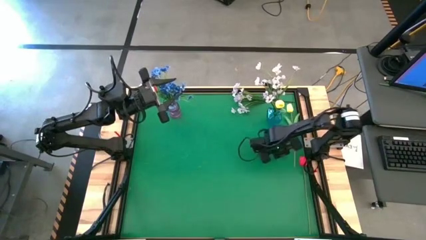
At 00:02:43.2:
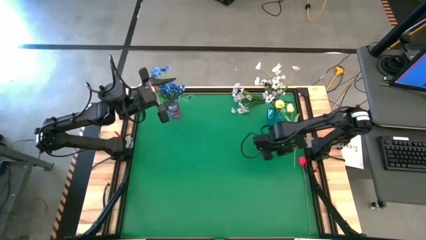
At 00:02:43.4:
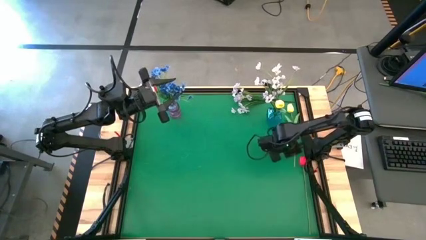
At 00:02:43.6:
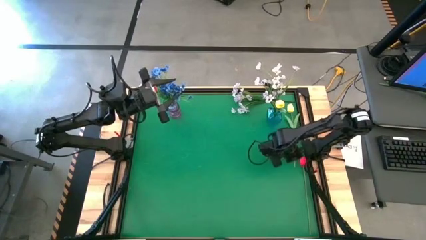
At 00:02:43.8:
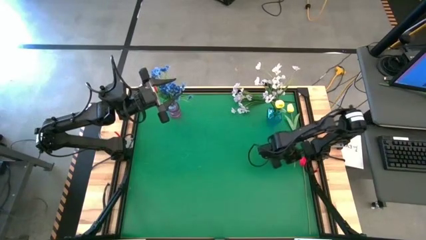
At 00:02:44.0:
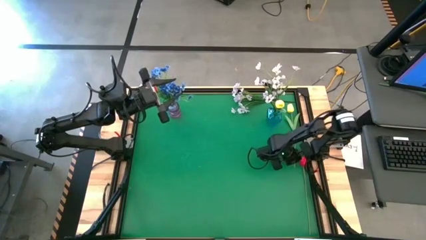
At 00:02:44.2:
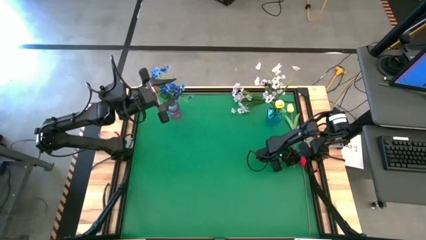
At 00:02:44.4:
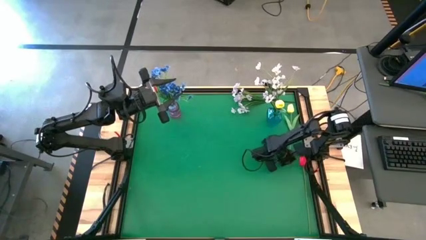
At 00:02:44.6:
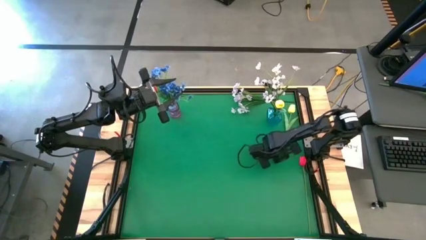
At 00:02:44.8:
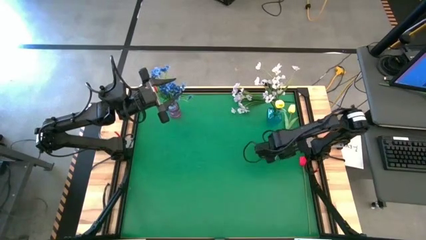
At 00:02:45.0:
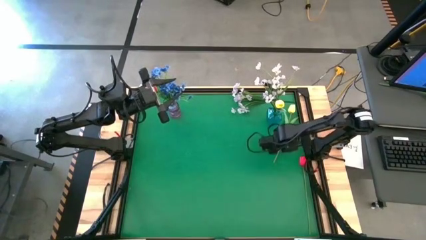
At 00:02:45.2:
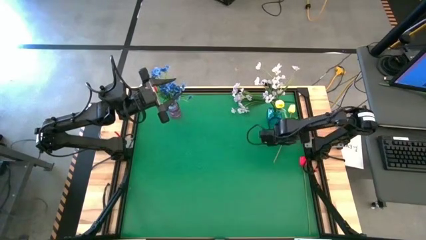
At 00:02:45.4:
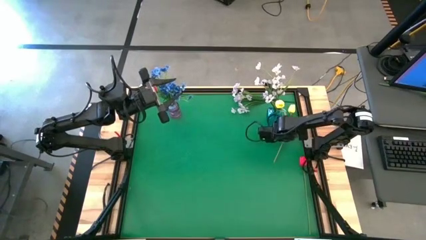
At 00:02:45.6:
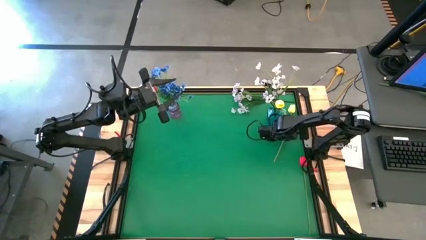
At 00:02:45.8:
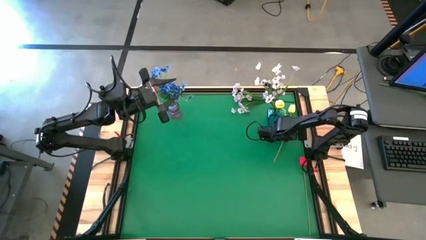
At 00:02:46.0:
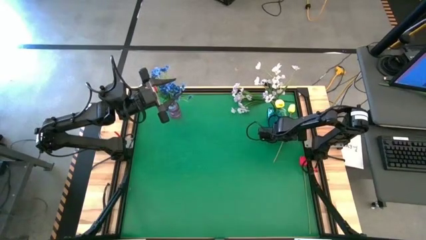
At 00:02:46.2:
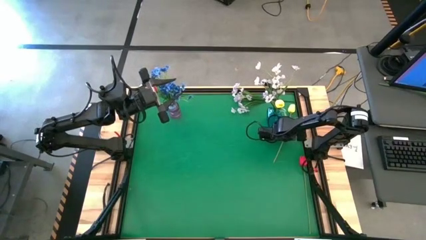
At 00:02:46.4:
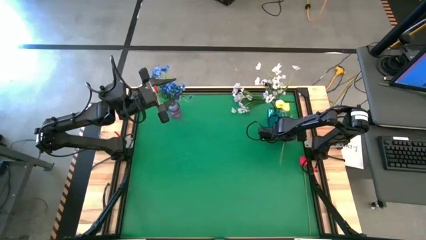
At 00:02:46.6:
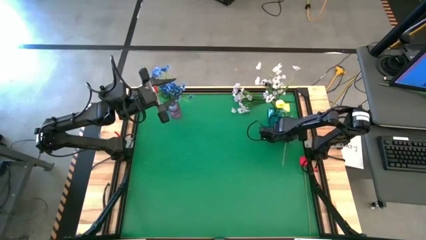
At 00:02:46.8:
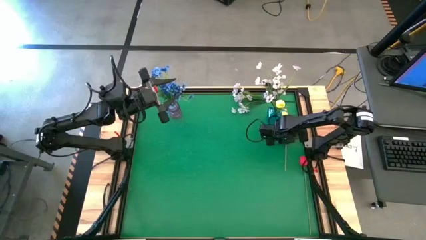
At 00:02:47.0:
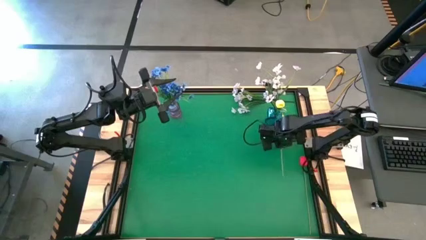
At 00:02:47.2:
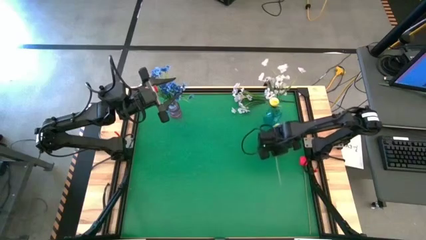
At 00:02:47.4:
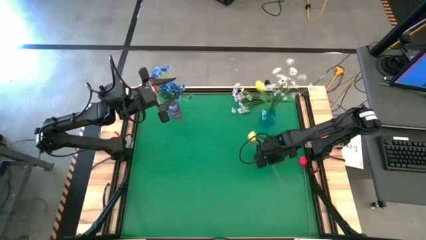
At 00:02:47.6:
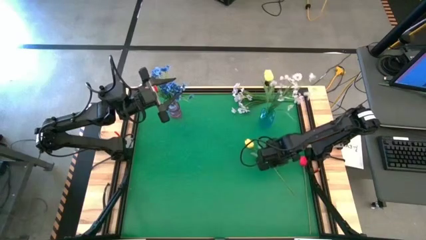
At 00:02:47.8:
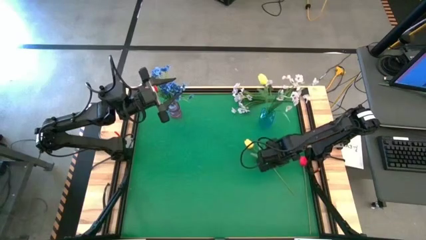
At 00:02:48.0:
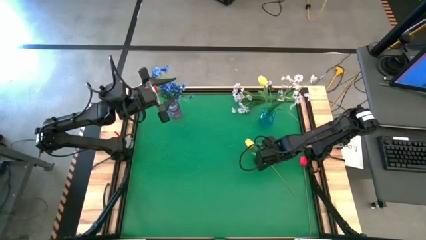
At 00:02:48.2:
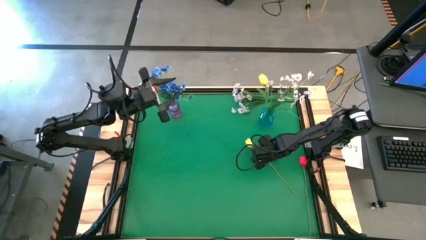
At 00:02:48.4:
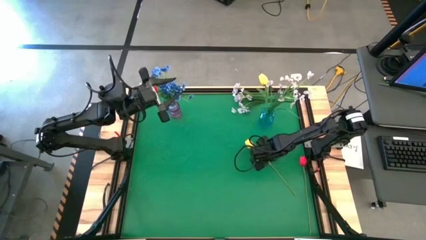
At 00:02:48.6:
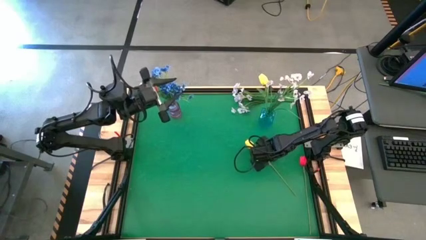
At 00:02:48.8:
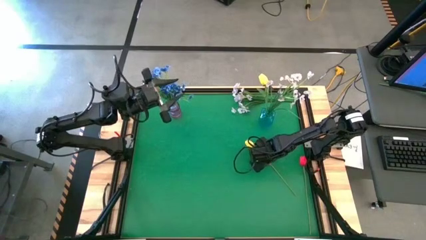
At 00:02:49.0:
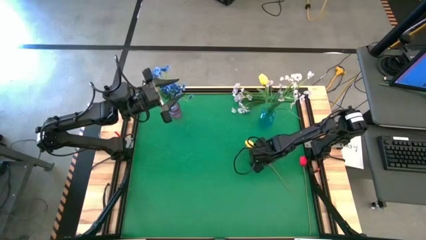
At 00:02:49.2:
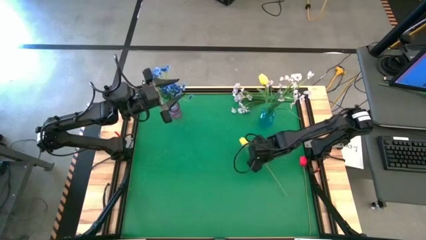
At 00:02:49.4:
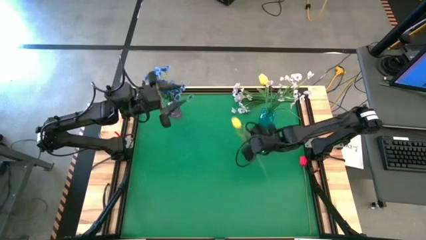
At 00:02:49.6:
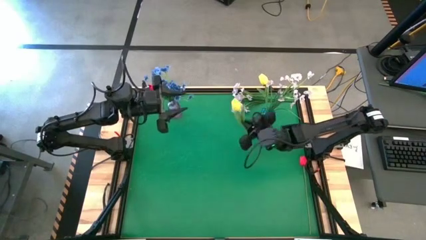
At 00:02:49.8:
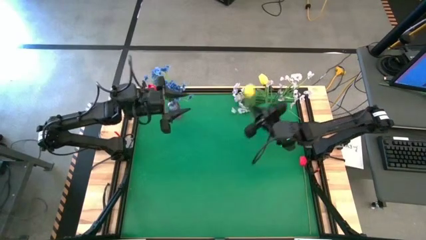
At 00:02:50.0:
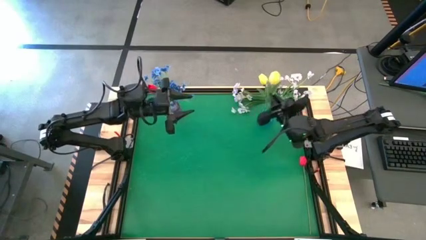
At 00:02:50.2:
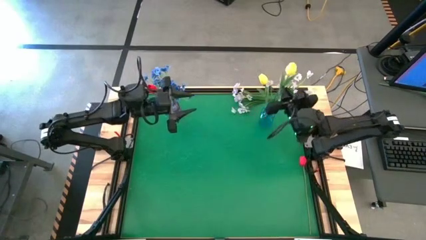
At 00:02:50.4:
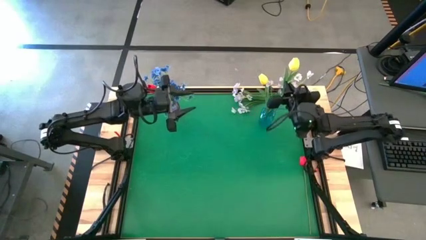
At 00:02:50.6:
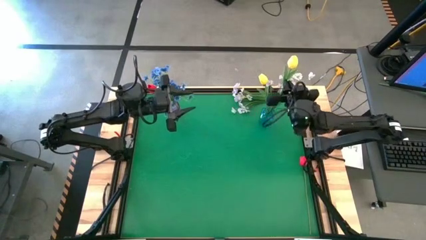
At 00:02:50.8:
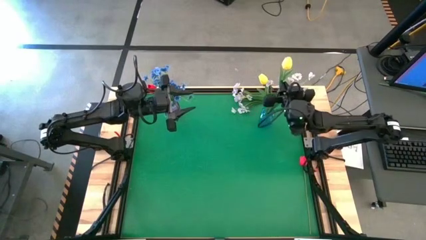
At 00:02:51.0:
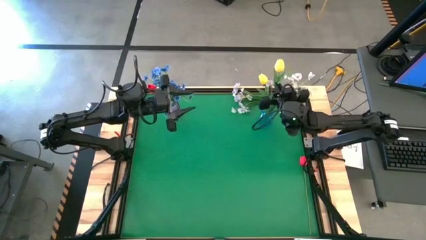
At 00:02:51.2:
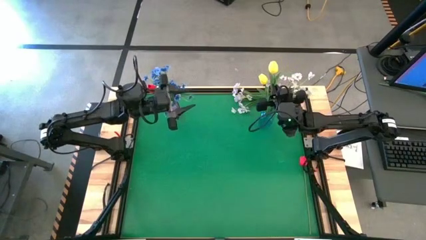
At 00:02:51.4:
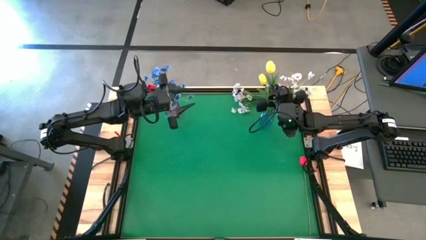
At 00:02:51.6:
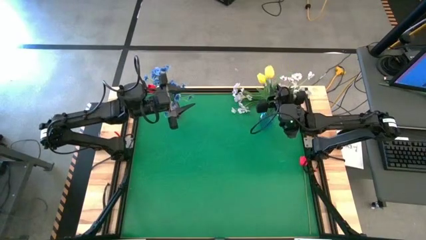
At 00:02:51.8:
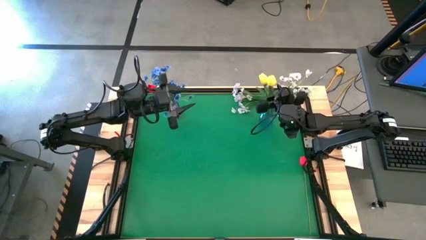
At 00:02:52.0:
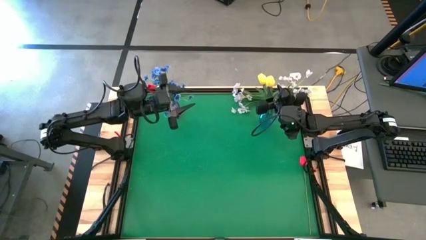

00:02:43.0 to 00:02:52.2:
Task: Sort flowers into vase by color
Put the yellow tulip into the blue vase

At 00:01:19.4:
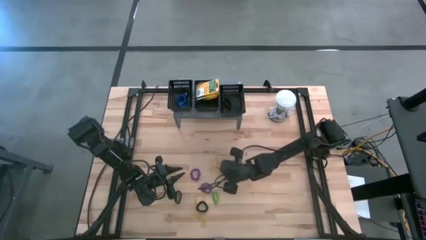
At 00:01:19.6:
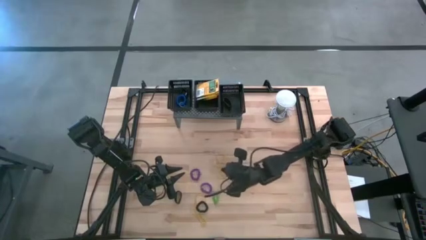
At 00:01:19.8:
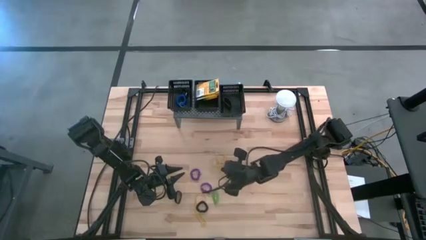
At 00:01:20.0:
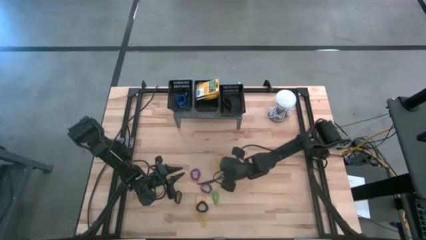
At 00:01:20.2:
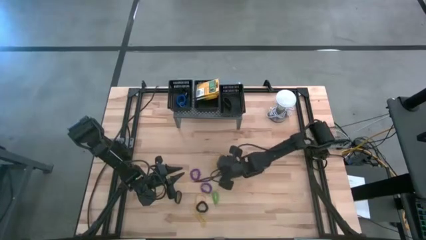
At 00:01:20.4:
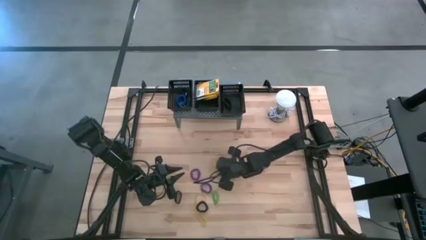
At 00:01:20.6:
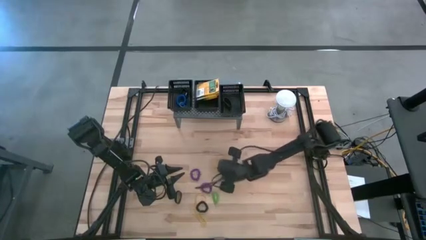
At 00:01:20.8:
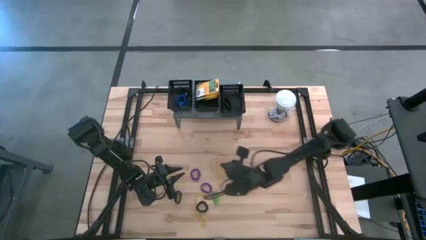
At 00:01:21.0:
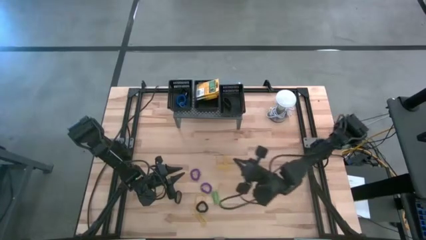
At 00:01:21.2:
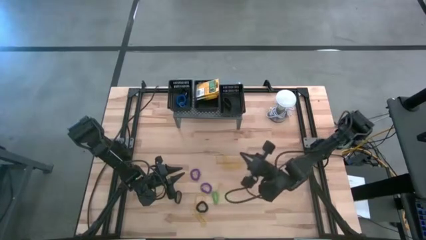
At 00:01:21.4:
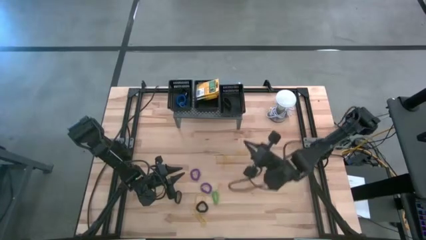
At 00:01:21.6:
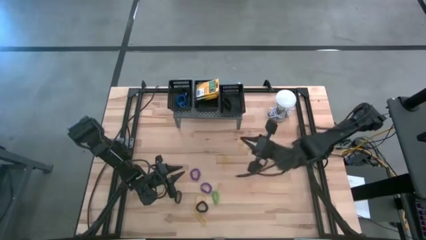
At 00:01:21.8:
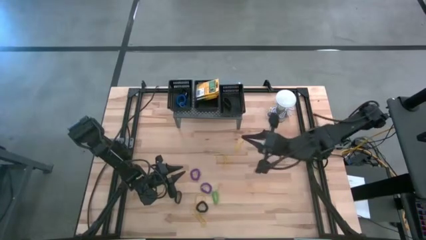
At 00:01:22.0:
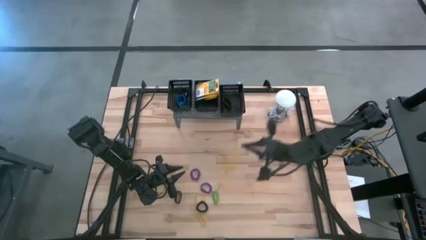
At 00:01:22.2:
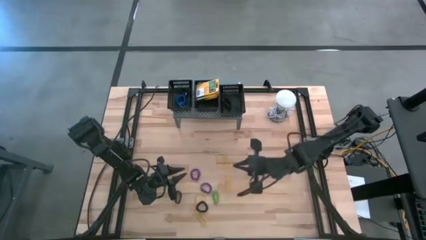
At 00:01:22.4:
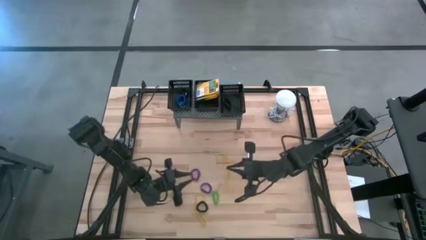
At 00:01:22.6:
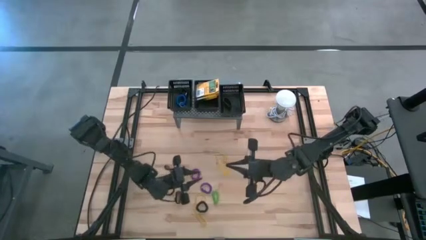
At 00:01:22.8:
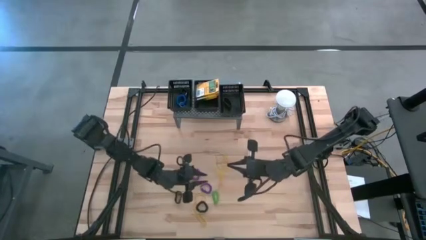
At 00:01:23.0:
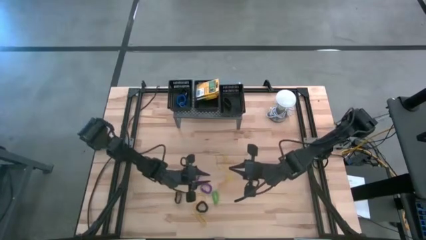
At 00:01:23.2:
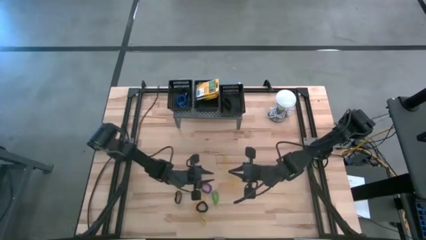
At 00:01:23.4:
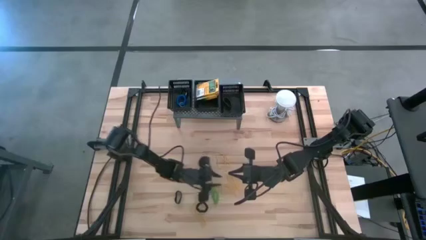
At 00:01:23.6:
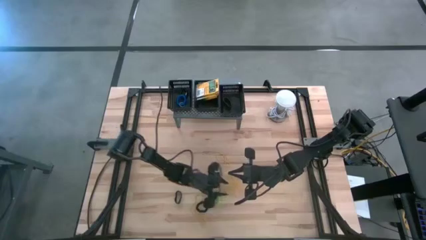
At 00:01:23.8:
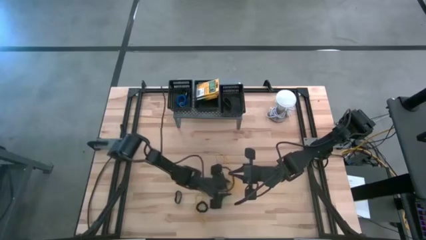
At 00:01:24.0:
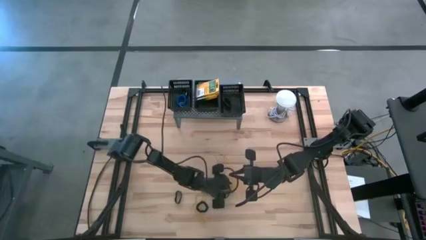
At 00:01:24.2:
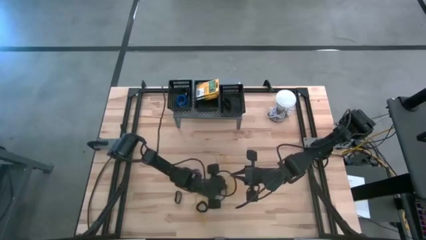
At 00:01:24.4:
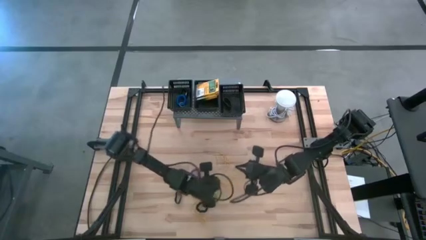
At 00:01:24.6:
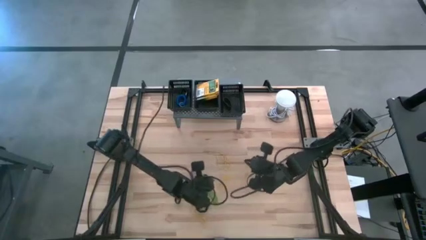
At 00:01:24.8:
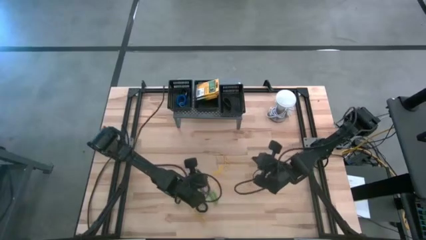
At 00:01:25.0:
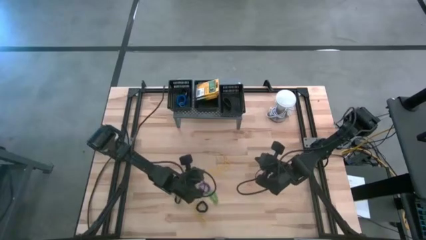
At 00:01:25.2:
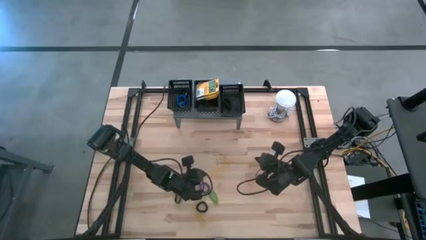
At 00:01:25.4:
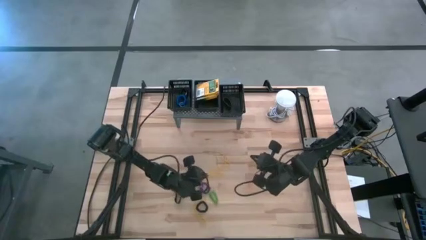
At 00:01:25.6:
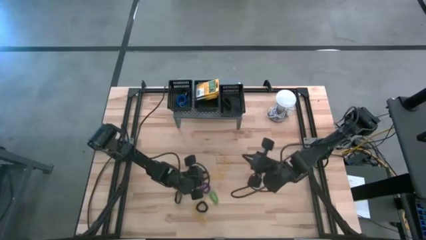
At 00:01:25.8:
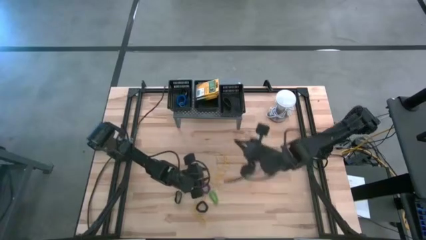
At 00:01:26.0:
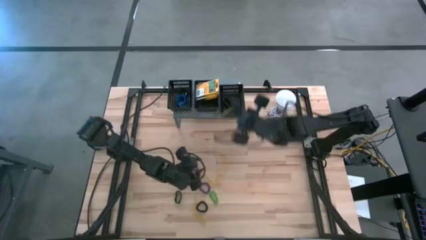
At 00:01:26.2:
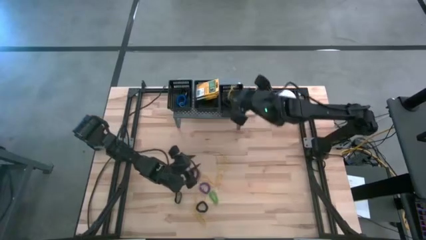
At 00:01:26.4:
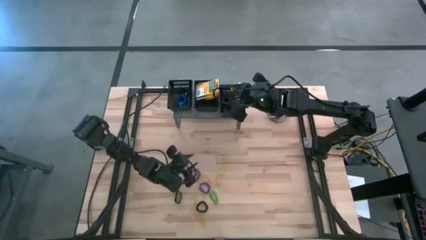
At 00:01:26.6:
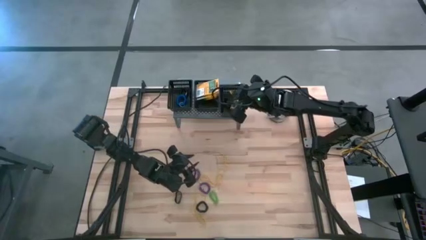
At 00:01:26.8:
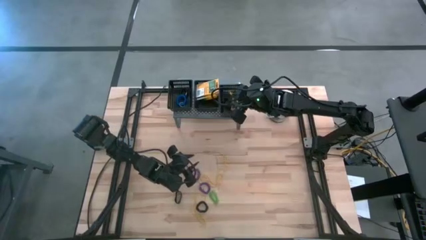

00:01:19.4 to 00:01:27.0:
Task: Pick & Place Office Desk Supplies
Put the yellow rubber band into the right black bin on the shelf
